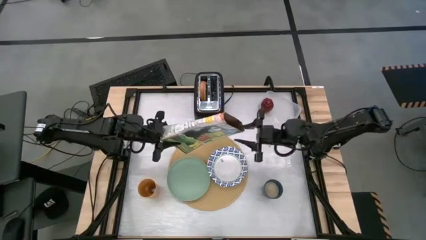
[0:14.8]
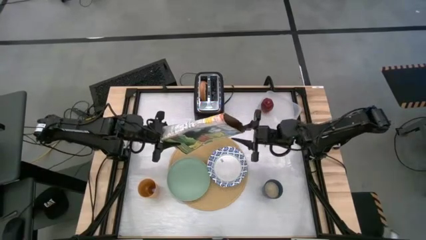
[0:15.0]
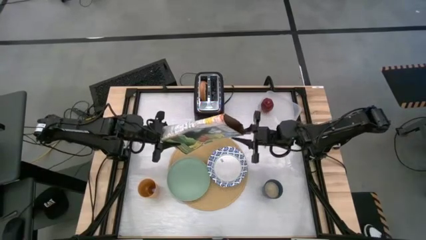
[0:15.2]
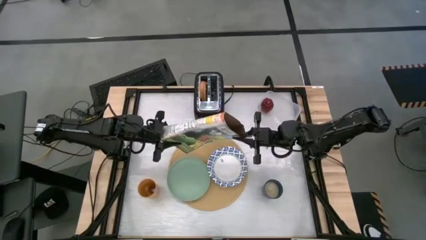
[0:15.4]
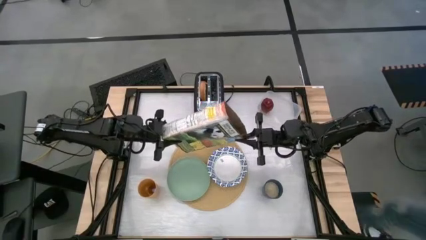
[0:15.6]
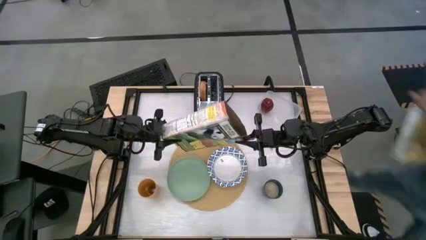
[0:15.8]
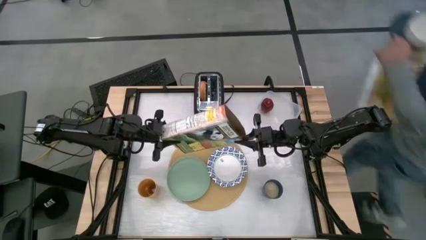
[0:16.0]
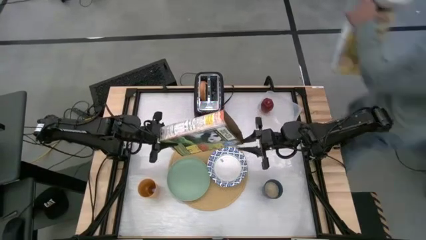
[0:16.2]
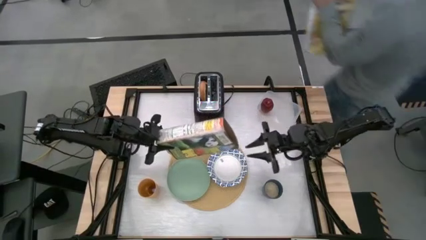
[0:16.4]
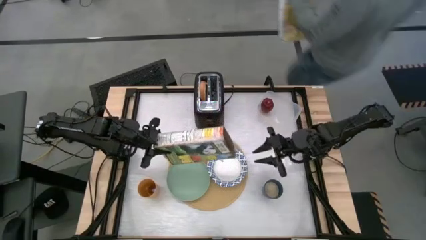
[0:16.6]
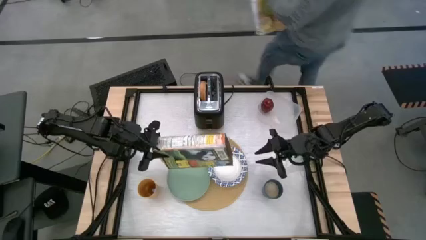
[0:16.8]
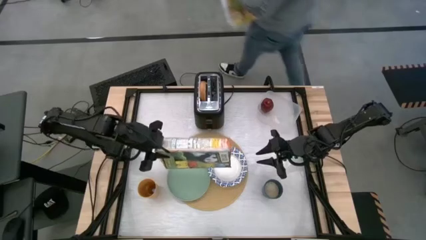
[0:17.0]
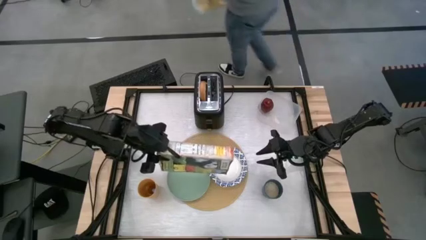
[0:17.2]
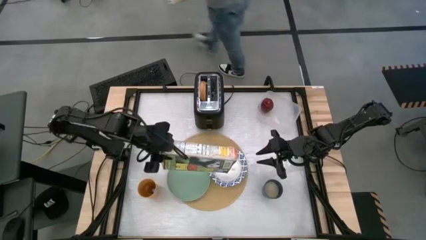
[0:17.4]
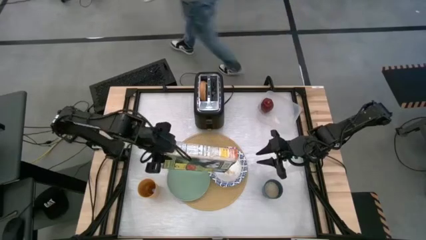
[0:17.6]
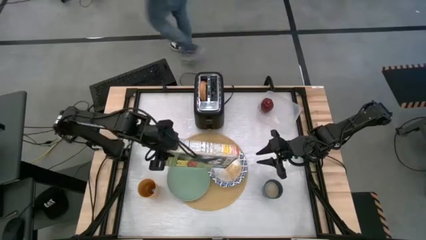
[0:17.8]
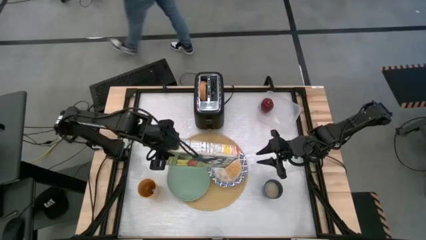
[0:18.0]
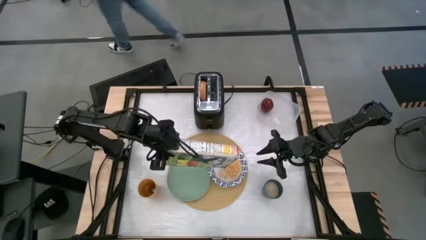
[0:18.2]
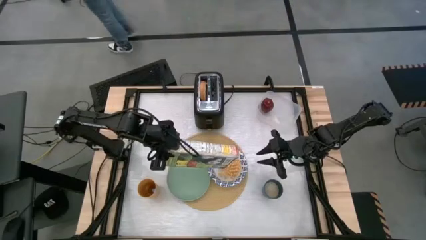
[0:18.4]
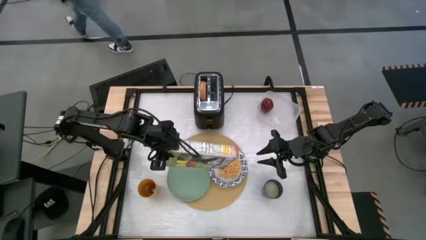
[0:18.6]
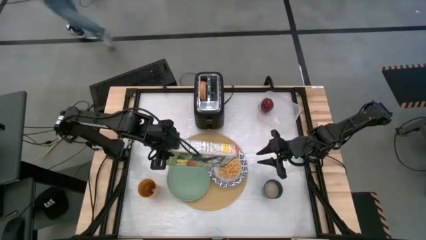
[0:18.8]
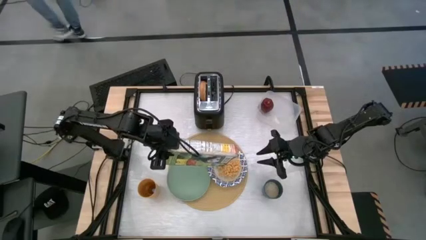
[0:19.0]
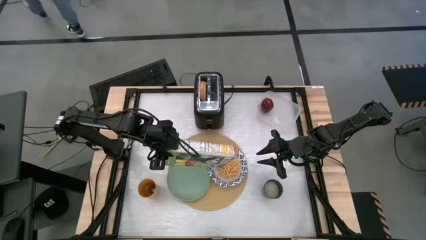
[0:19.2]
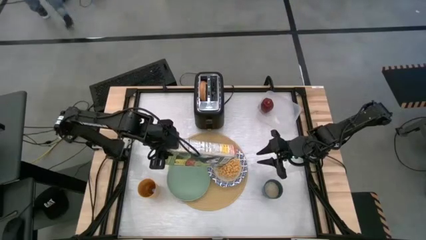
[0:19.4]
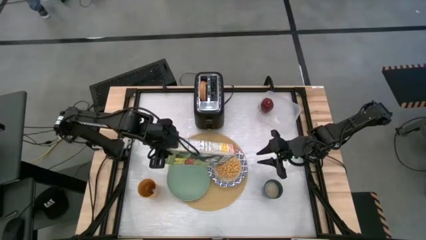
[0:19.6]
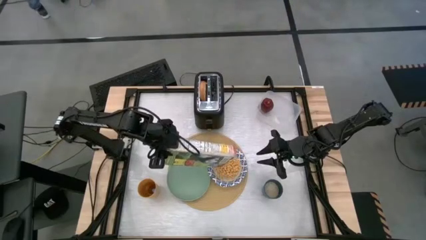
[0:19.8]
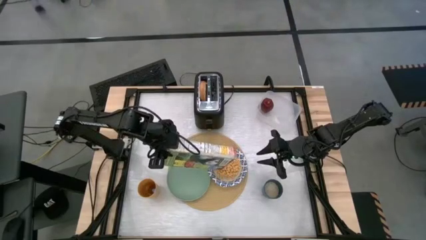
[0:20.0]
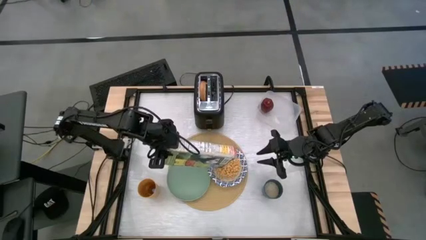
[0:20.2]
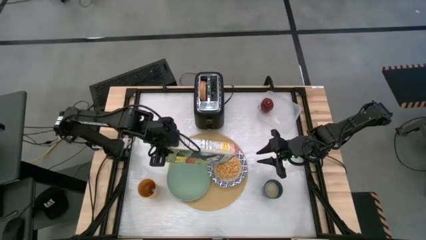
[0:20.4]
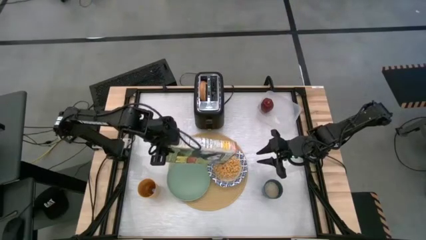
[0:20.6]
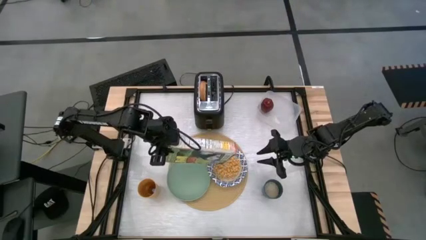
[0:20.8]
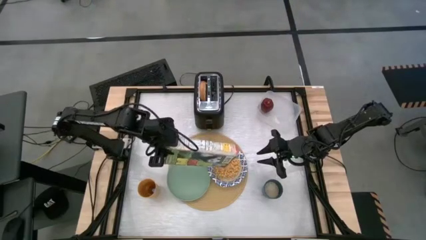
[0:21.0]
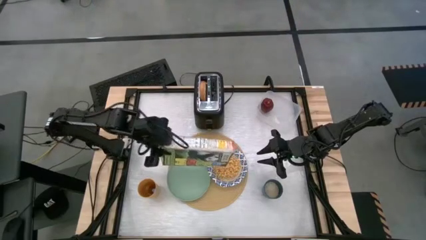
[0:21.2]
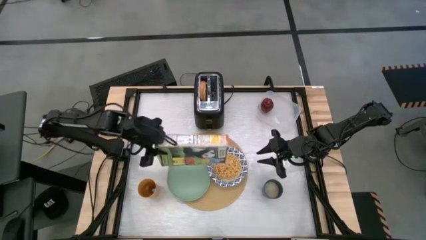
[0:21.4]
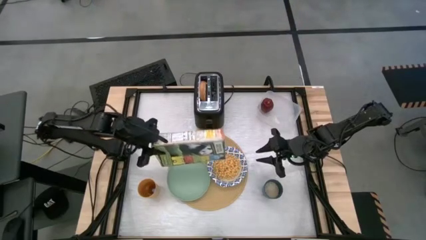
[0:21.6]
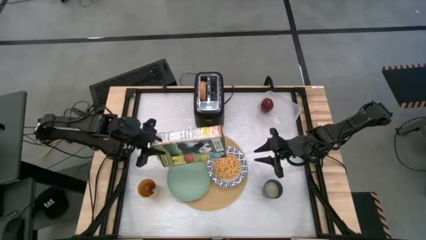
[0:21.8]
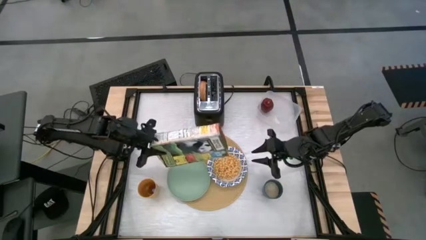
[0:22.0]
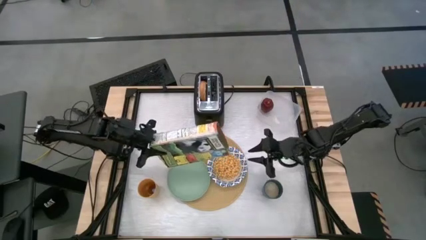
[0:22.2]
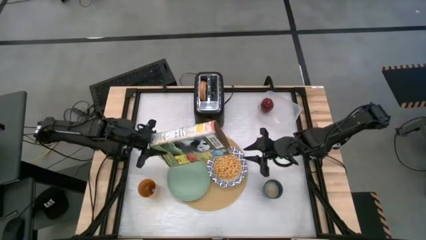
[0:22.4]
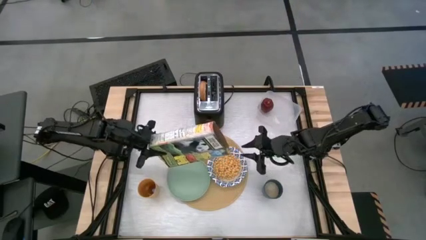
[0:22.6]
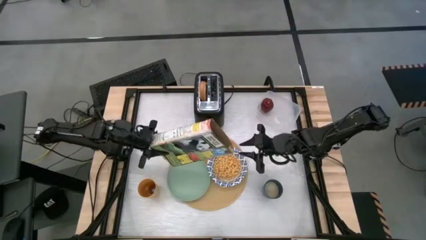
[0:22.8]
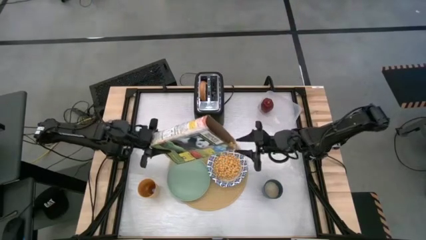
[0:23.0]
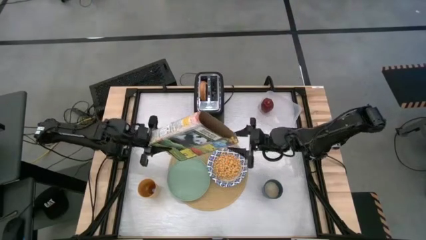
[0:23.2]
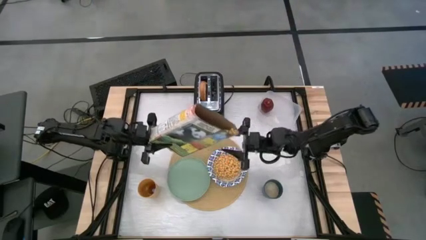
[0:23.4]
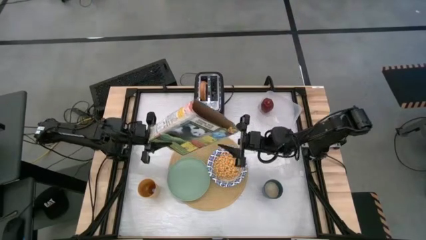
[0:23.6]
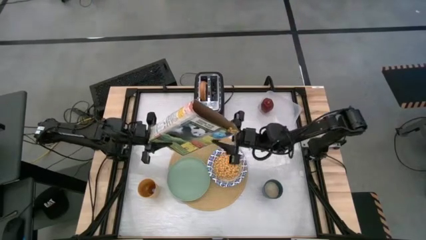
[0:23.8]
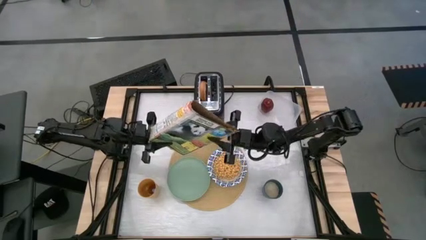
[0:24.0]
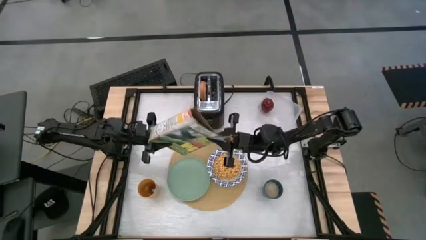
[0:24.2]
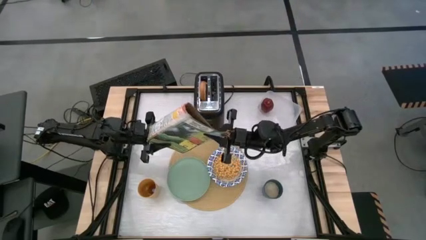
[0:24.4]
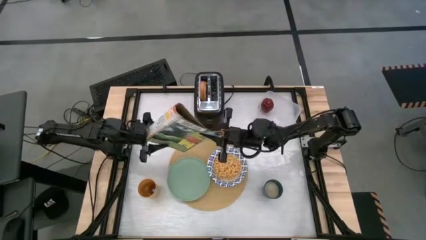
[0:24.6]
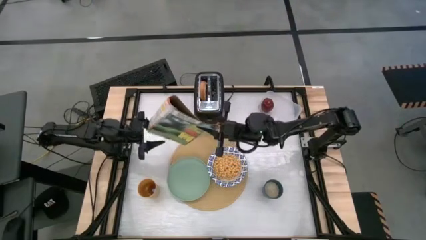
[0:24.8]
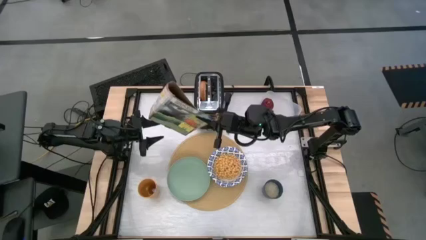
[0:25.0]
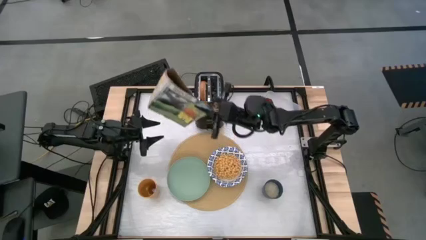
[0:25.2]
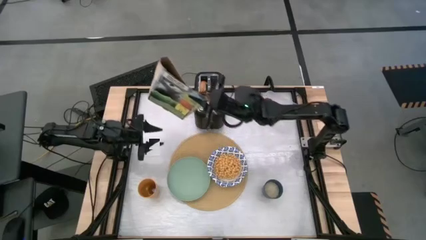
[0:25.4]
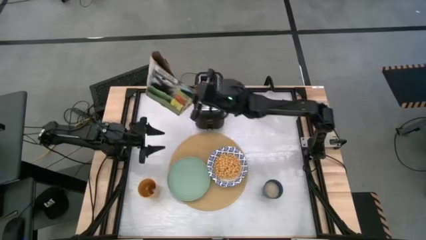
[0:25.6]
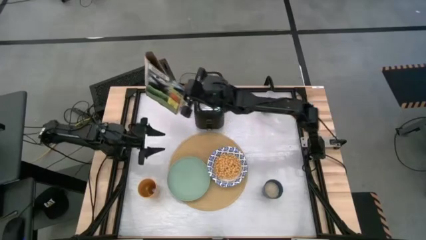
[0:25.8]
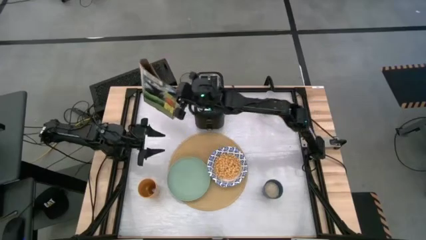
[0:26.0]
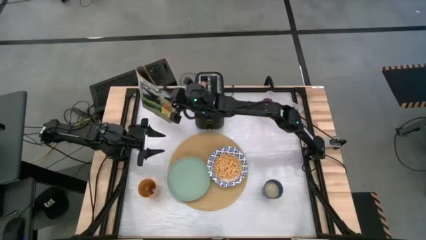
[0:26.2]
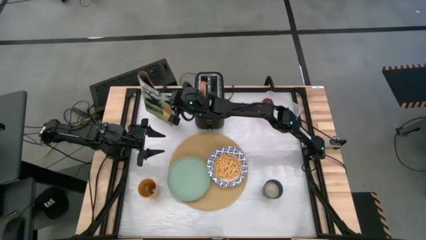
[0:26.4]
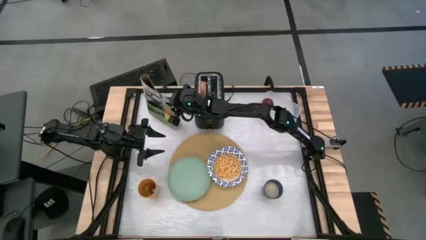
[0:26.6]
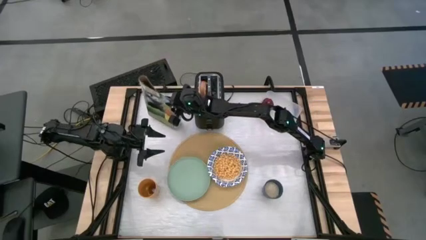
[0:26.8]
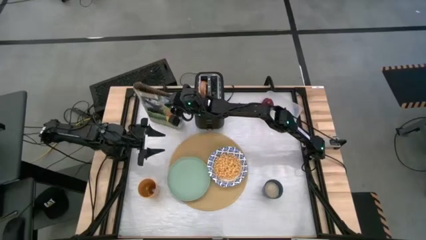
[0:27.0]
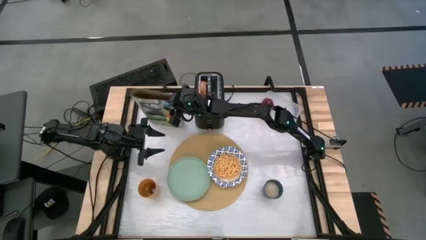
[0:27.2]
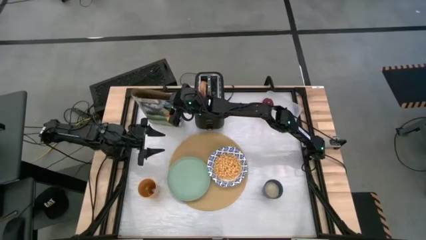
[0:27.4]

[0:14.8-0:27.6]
Task: Arrange a breakfast setting
Pour the cereal from the cereal box into a bowl

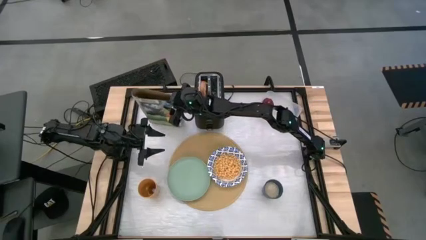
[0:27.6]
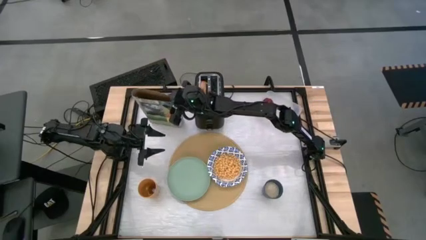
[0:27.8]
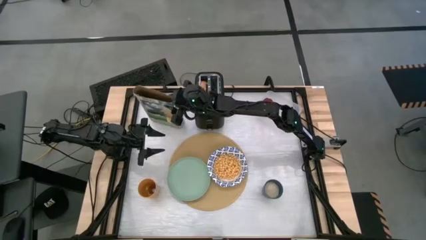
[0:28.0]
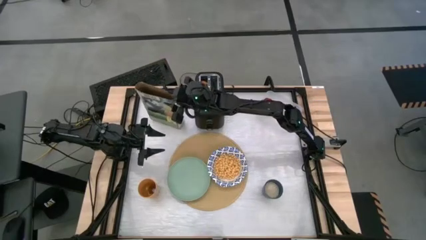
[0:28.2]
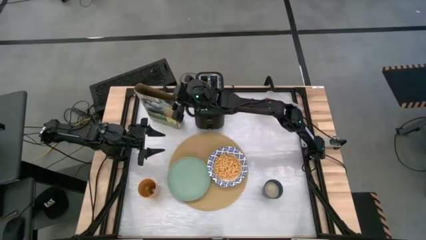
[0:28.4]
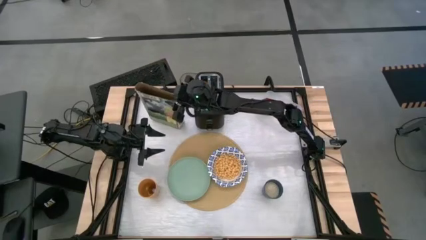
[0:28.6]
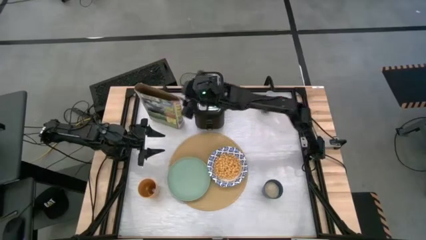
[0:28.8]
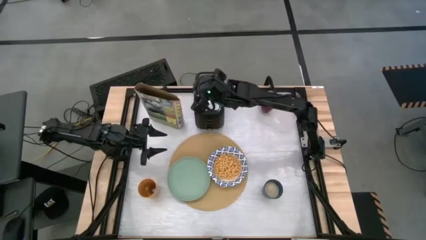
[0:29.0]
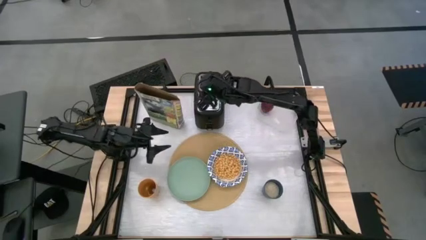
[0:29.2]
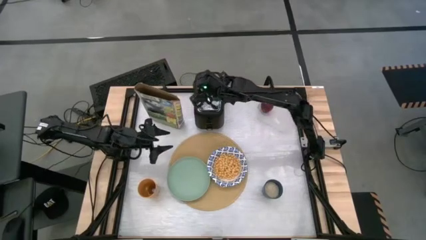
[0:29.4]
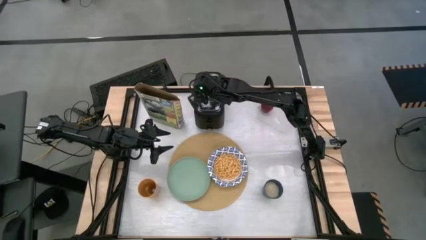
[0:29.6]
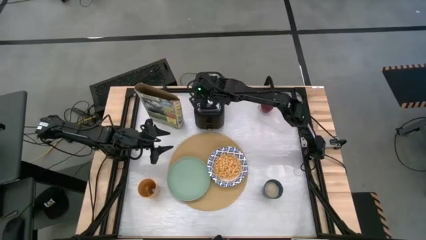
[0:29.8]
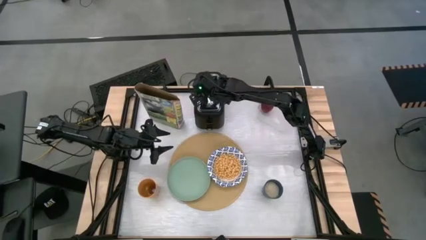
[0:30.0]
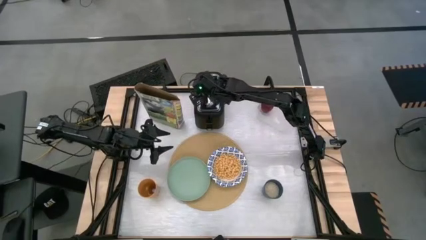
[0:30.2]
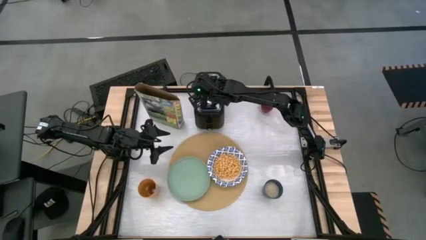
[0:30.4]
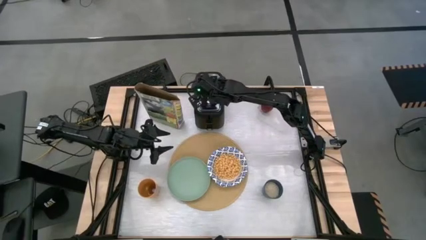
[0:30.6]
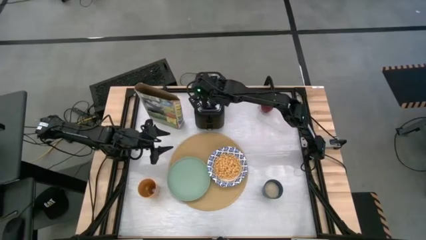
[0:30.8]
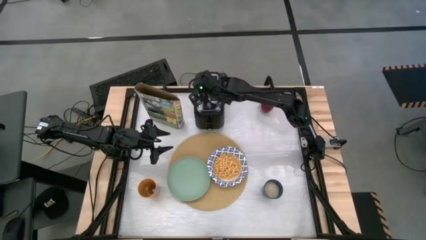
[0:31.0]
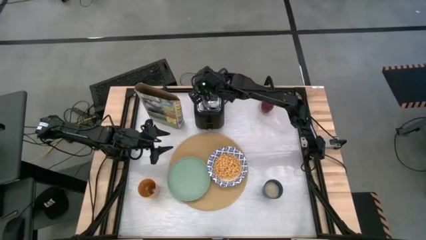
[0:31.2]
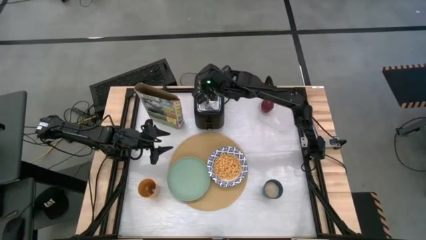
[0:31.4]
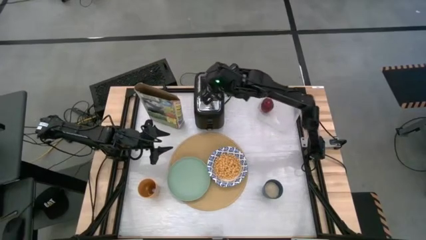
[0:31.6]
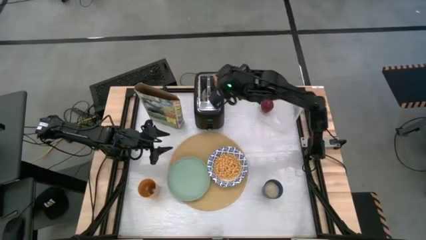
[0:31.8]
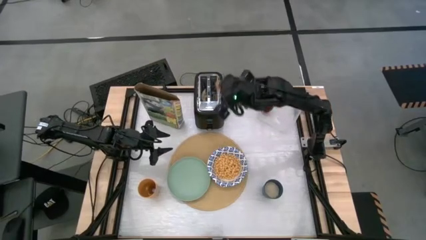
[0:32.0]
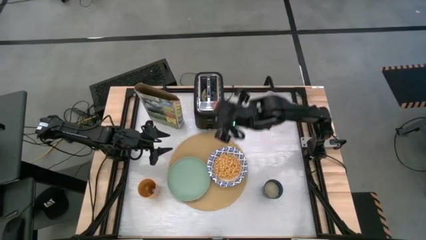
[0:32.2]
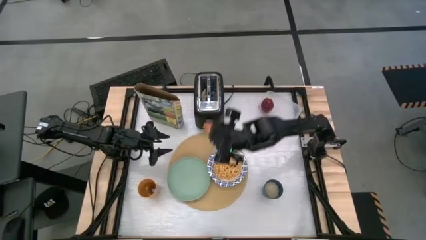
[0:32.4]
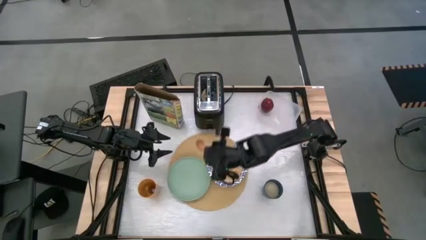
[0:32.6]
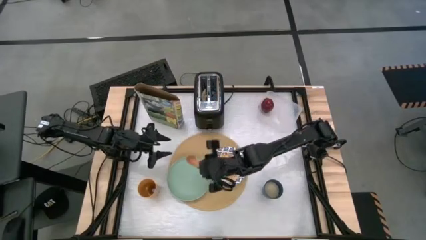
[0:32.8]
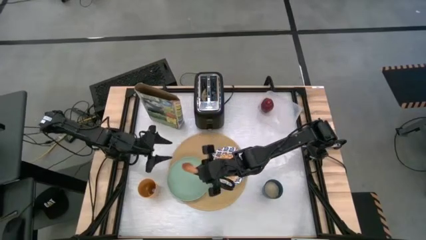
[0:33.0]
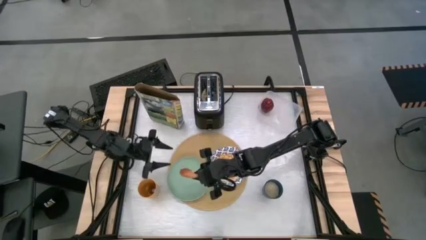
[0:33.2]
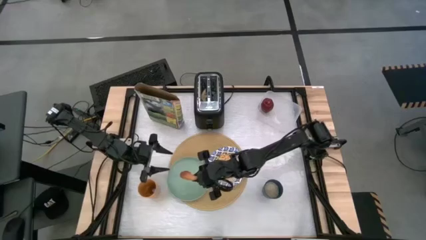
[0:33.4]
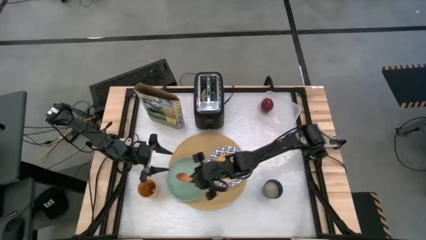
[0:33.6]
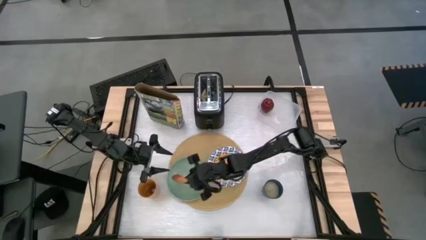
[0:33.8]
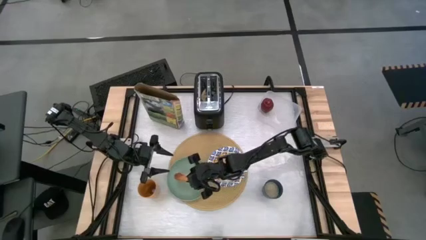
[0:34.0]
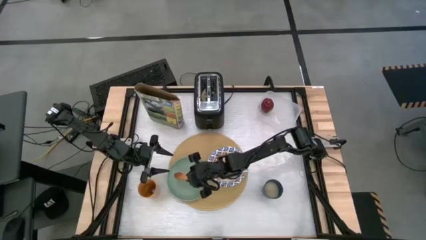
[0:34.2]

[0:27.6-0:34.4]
Put the bagel on the plate
